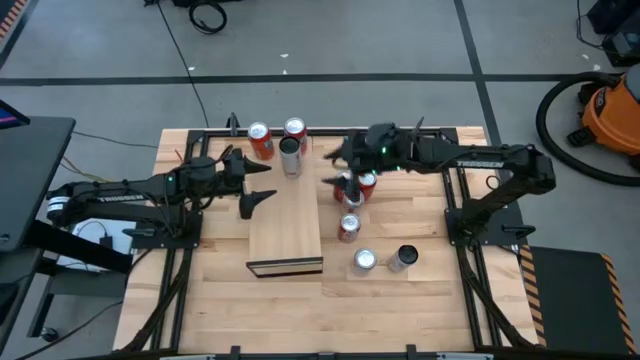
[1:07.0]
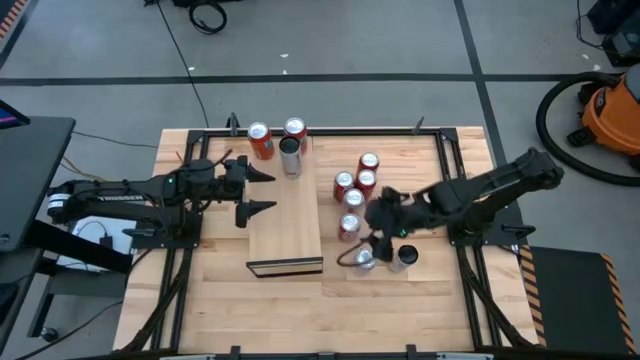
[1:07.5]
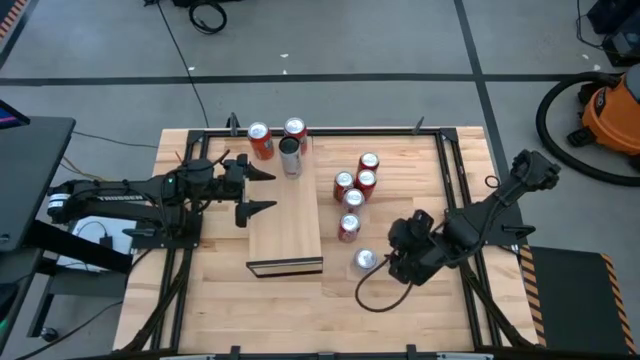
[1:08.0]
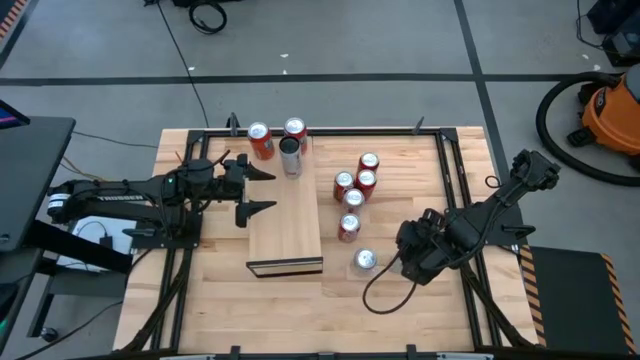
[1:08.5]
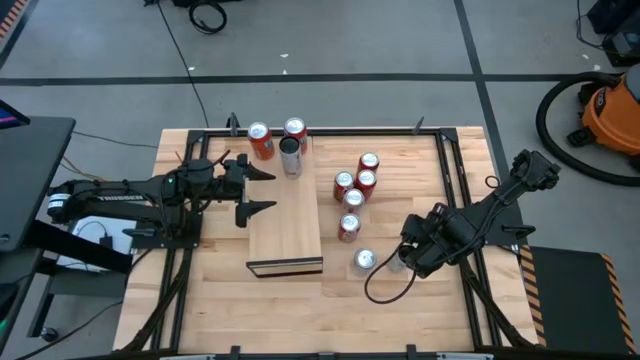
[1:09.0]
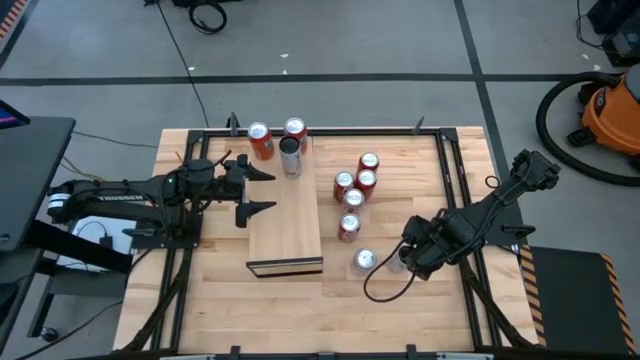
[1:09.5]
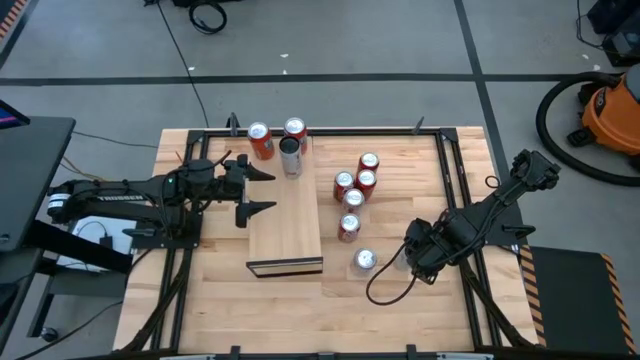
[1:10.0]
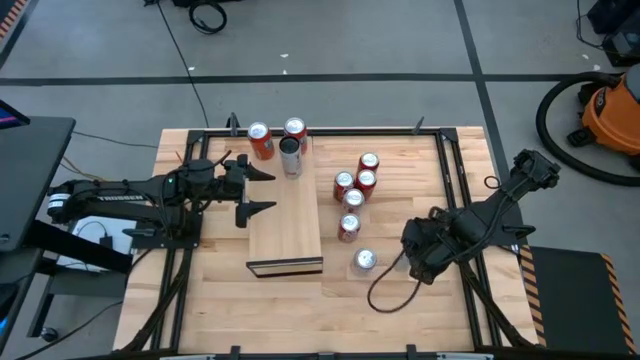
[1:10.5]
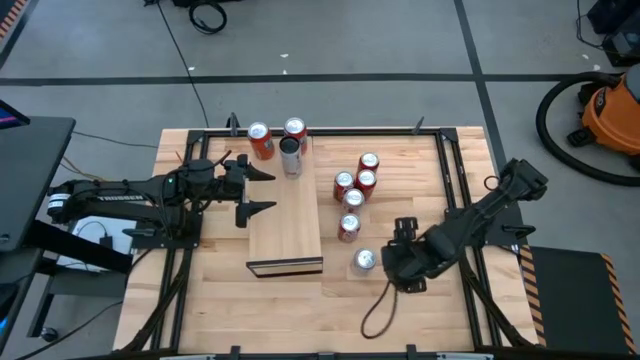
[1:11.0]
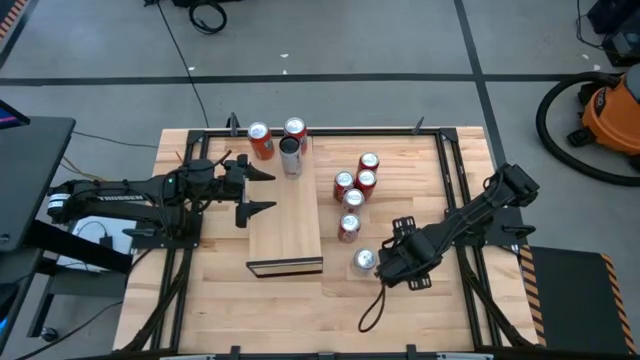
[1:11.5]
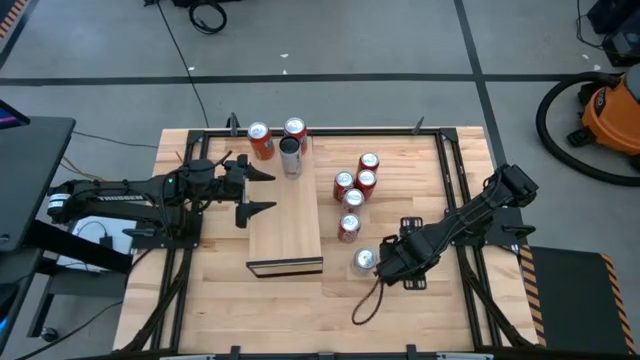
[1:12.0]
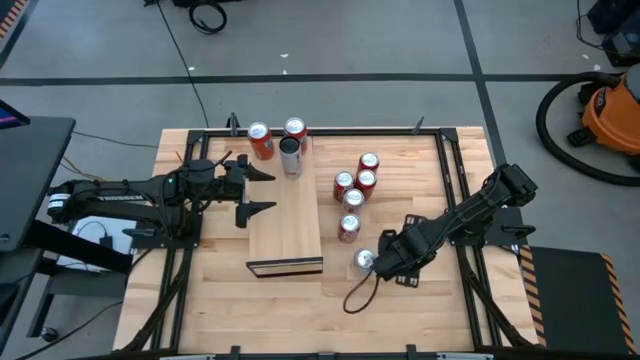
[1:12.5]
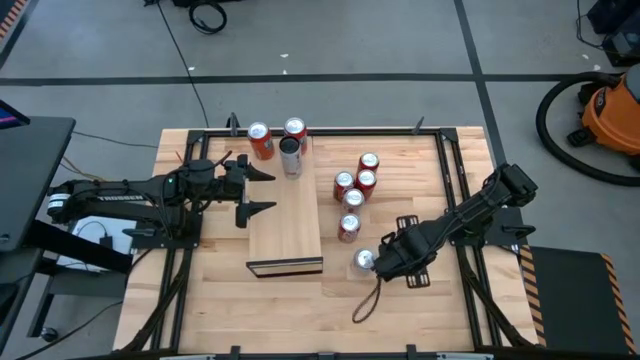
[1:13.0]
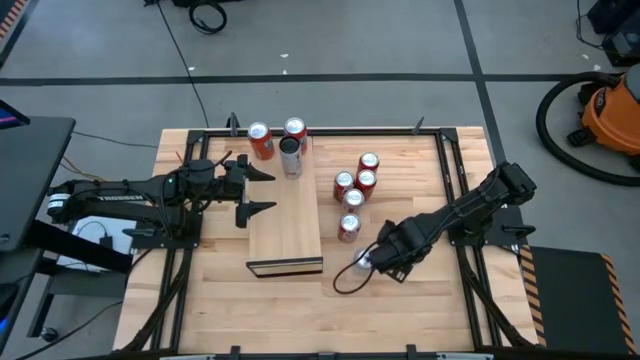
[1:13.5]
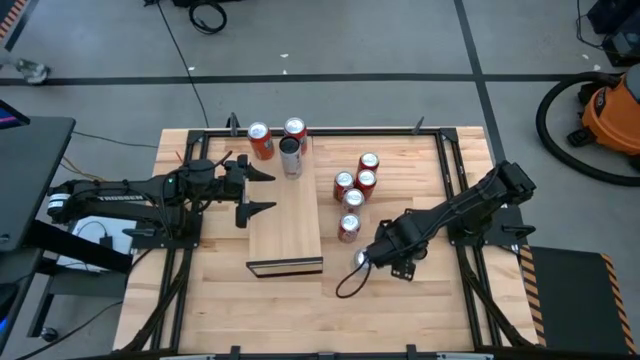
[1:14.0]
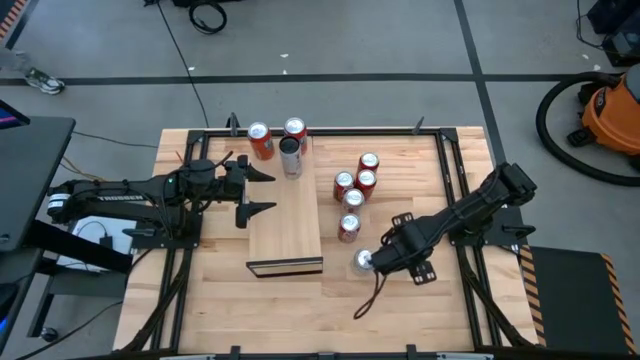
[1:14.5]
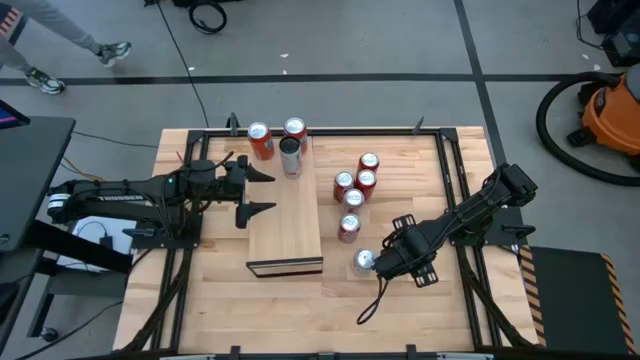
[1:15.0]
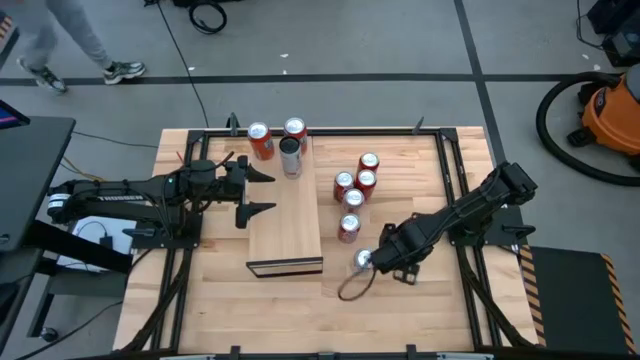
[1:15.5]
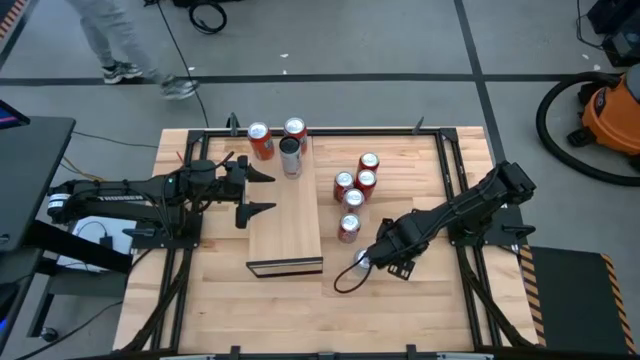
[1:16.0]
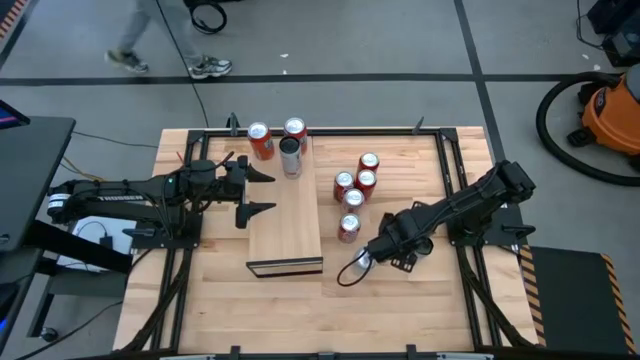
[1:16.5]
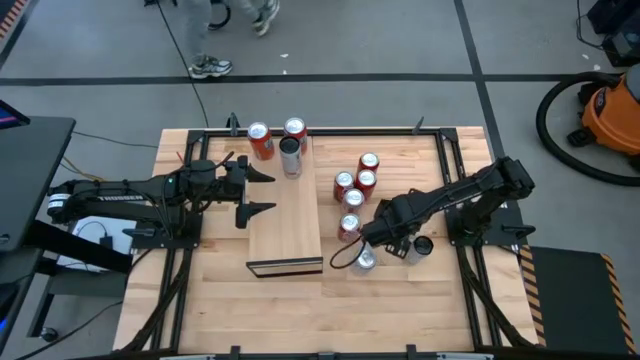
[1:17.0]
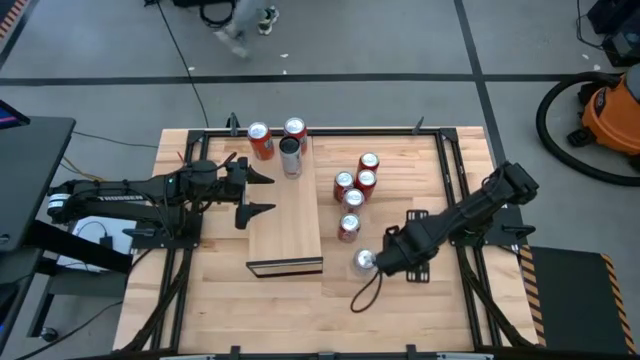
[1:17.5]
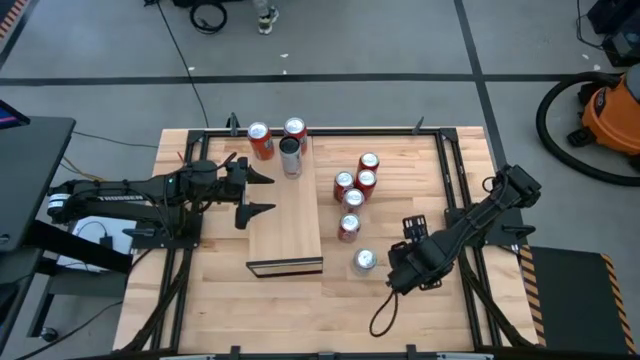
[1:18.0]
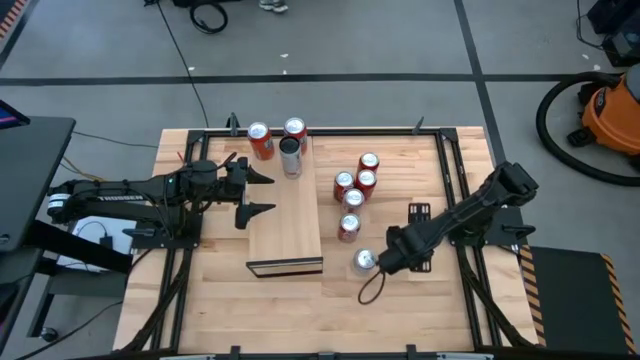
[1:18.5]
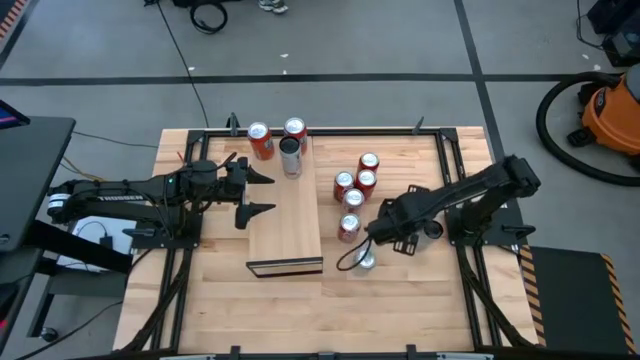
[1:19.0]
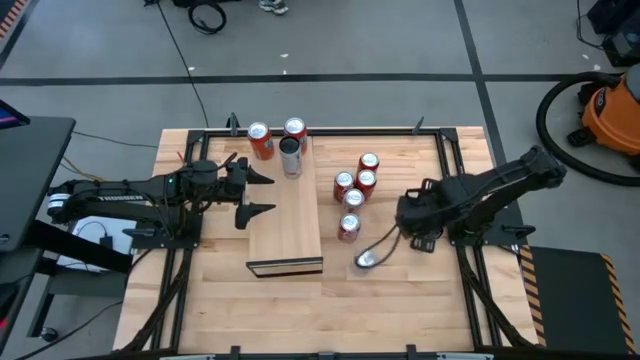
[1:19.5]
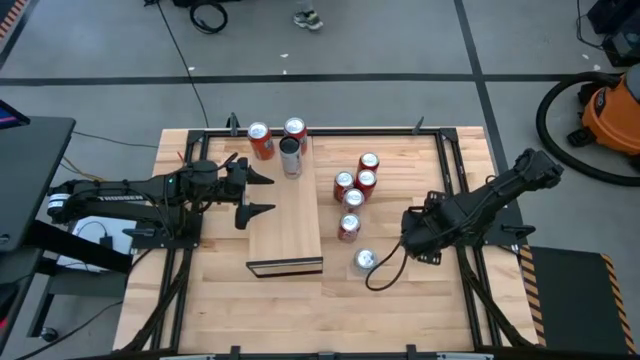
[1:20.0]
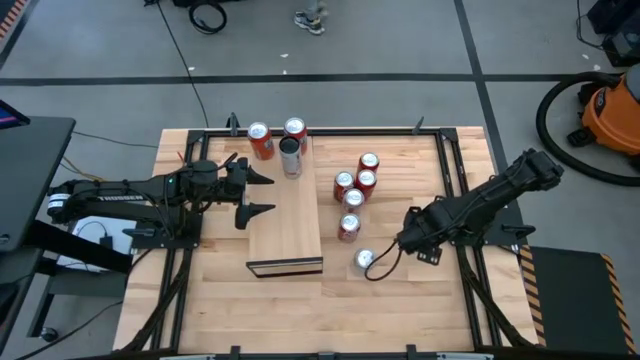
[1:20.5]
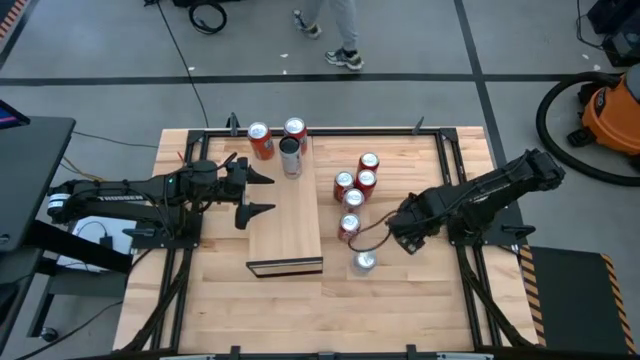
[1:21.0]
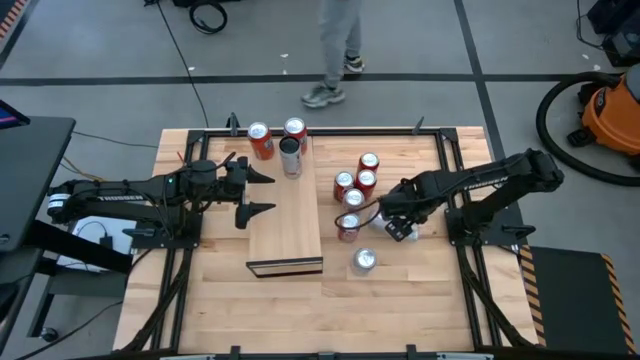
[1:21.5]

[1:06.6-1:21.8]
Task: Place canned beverage on shelf
Put the white-pink soda can on the shelf and align it with the other white-pink soda can
